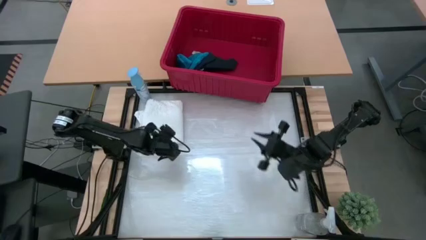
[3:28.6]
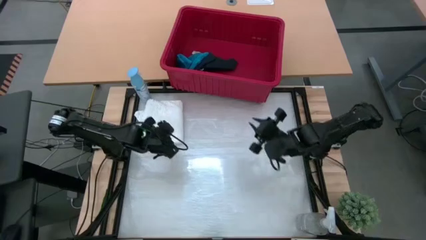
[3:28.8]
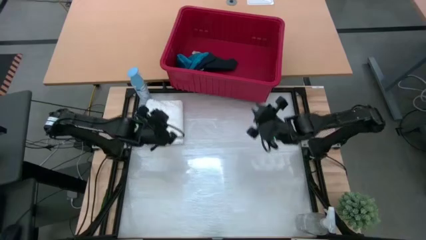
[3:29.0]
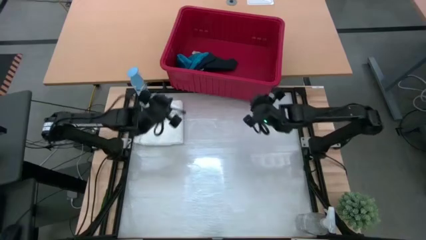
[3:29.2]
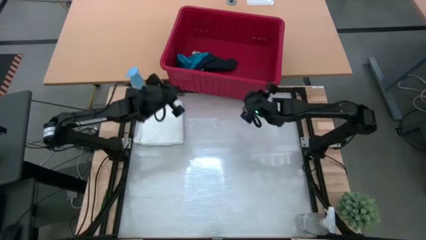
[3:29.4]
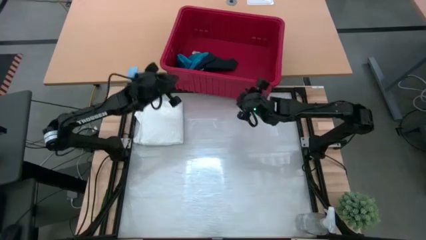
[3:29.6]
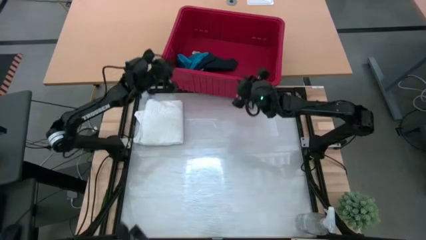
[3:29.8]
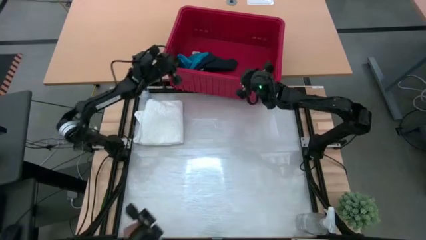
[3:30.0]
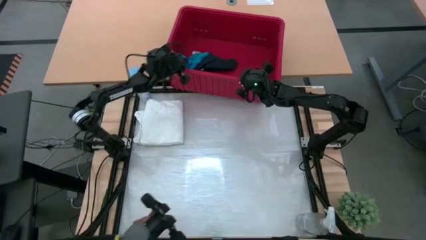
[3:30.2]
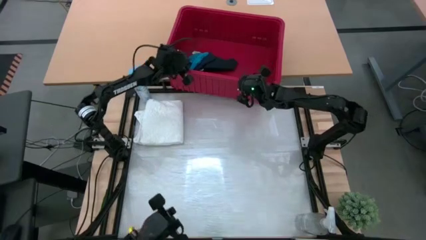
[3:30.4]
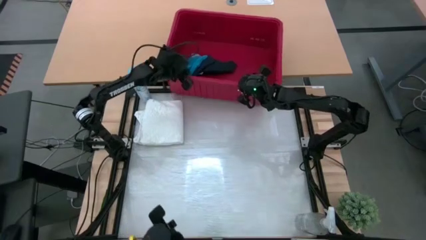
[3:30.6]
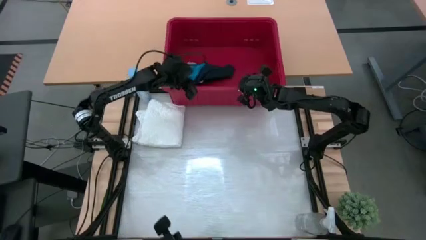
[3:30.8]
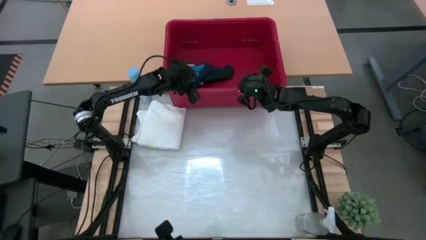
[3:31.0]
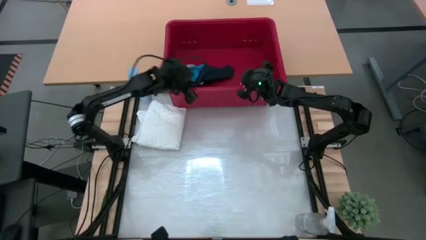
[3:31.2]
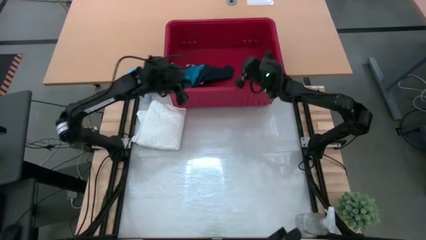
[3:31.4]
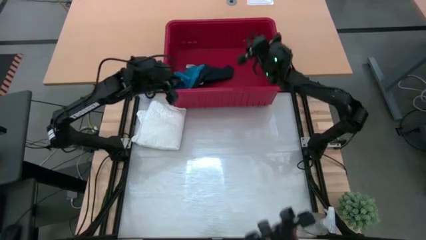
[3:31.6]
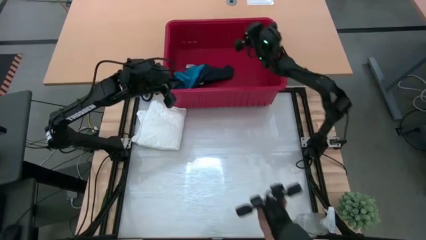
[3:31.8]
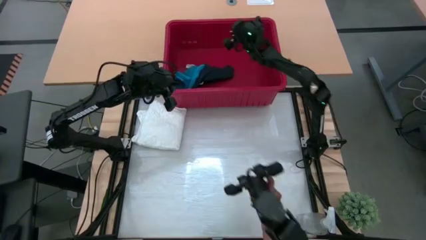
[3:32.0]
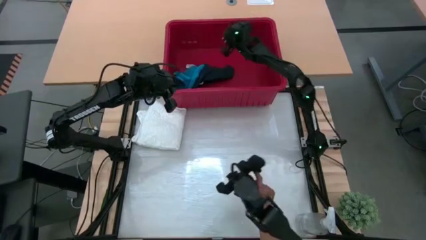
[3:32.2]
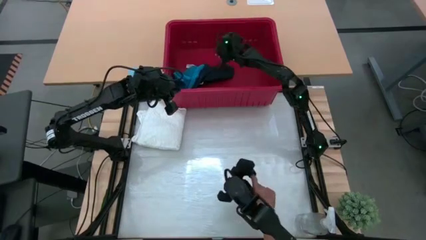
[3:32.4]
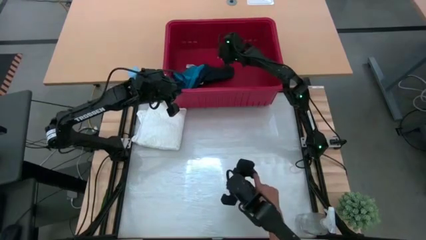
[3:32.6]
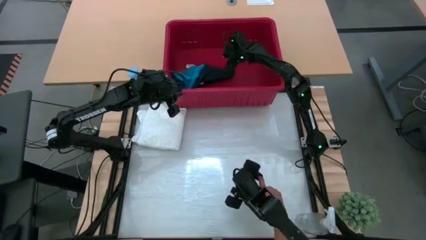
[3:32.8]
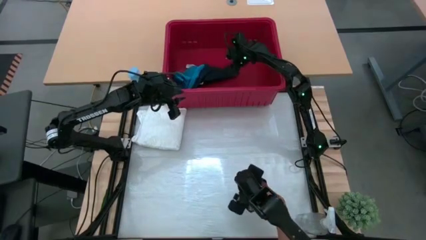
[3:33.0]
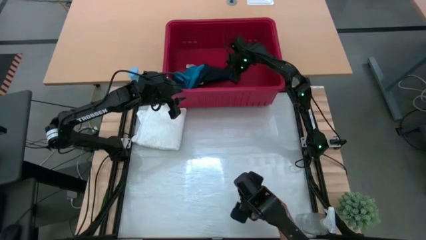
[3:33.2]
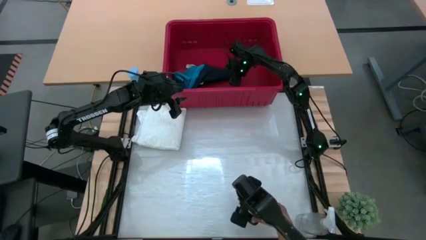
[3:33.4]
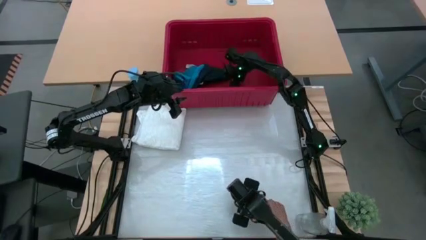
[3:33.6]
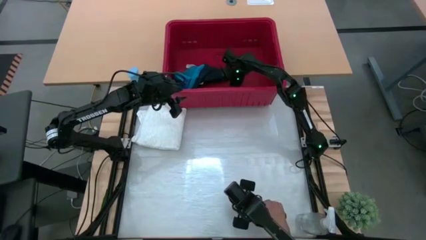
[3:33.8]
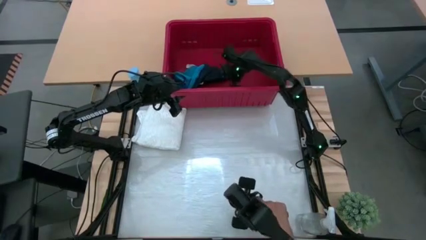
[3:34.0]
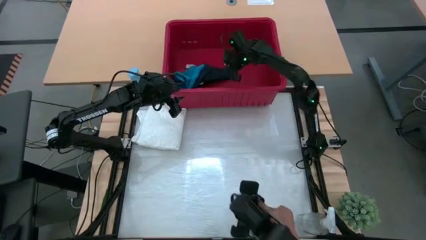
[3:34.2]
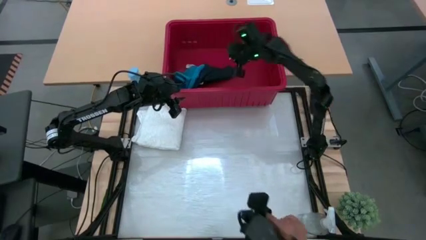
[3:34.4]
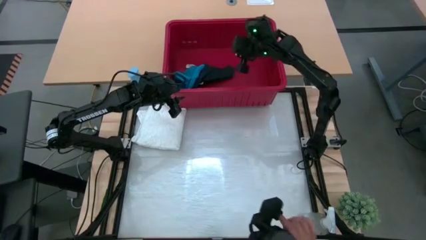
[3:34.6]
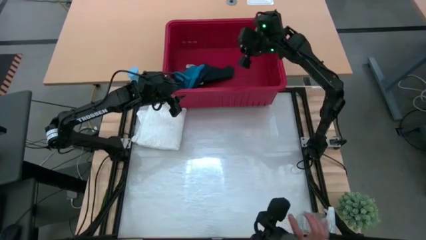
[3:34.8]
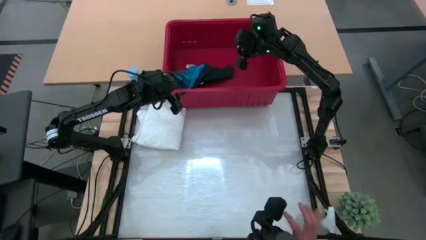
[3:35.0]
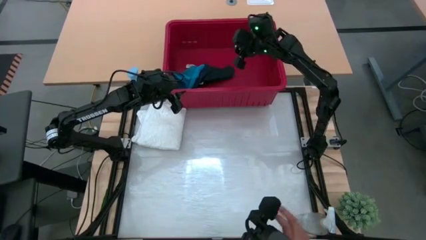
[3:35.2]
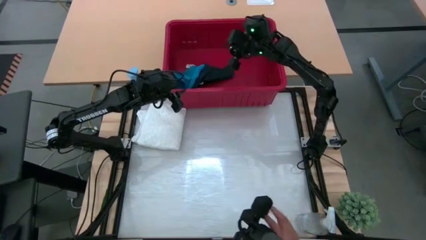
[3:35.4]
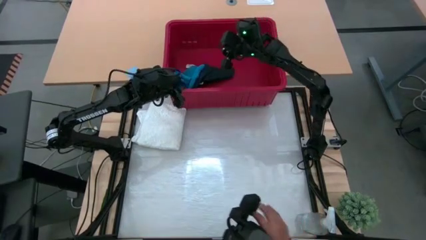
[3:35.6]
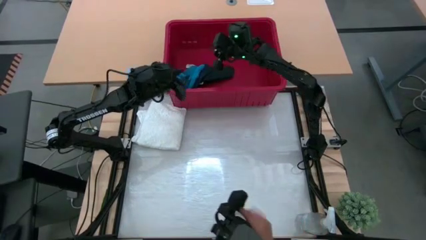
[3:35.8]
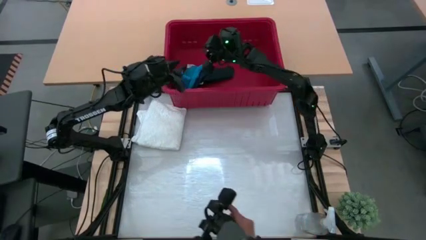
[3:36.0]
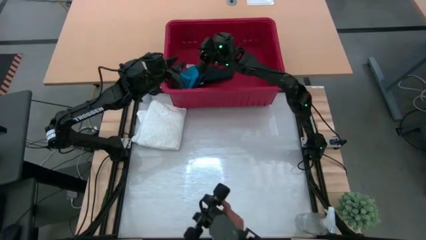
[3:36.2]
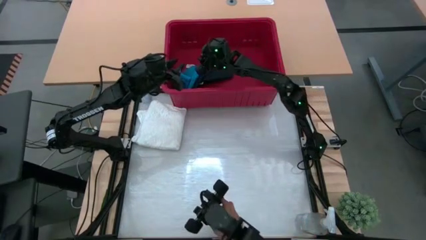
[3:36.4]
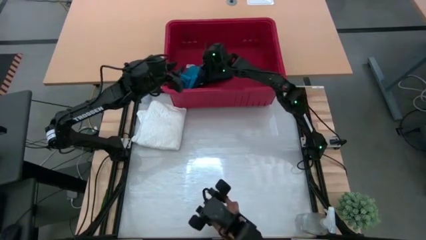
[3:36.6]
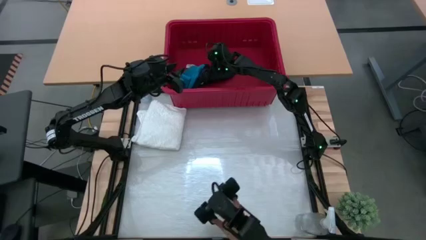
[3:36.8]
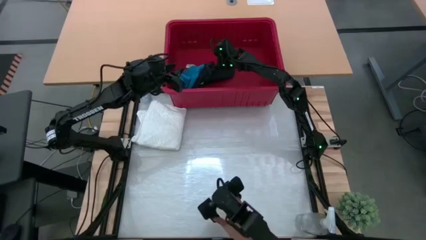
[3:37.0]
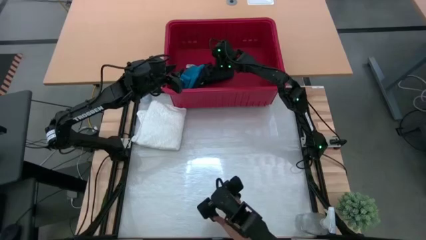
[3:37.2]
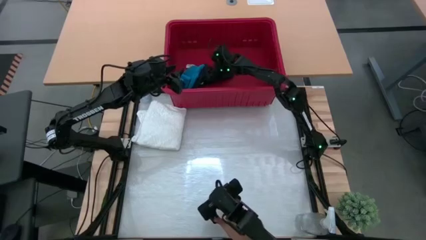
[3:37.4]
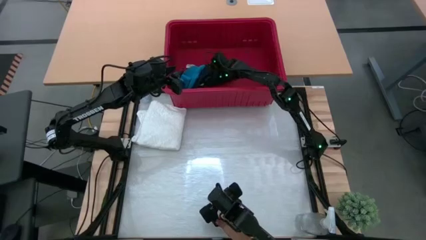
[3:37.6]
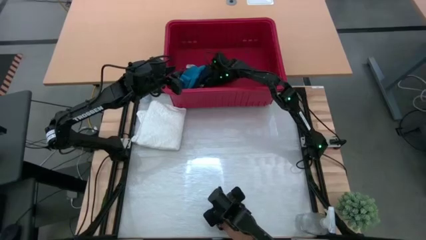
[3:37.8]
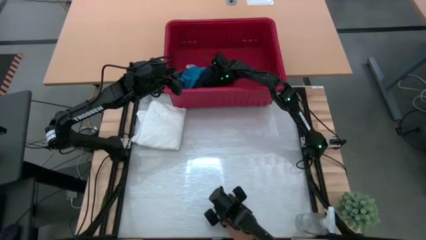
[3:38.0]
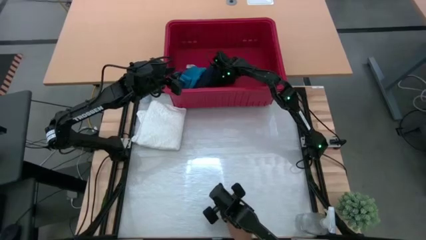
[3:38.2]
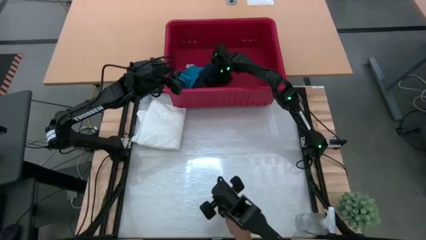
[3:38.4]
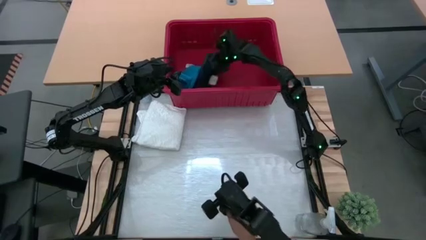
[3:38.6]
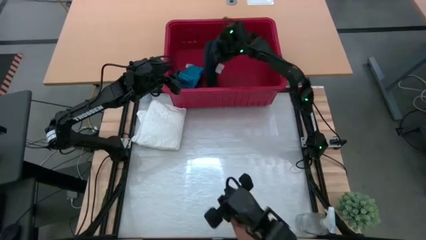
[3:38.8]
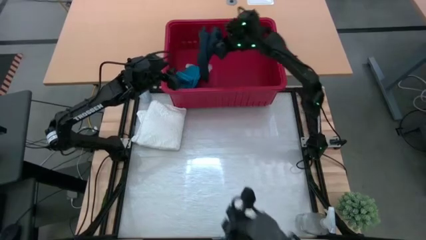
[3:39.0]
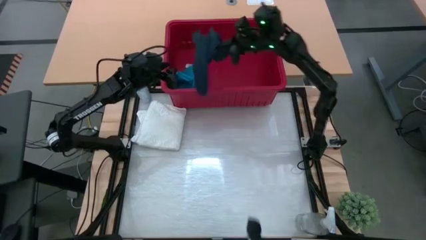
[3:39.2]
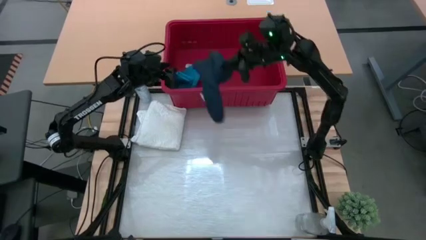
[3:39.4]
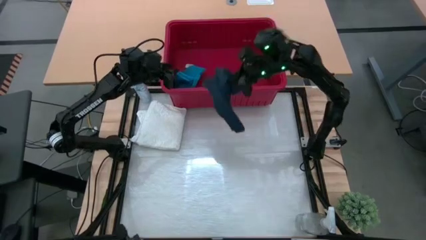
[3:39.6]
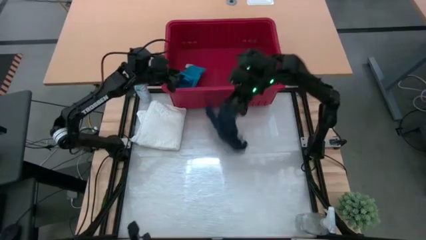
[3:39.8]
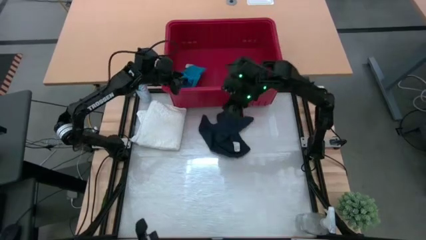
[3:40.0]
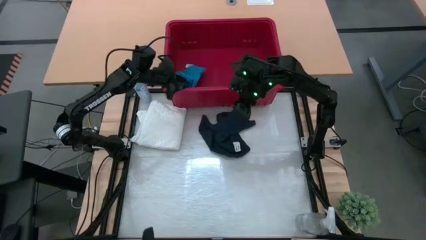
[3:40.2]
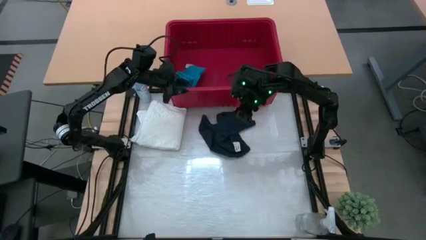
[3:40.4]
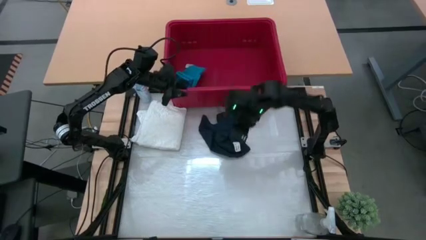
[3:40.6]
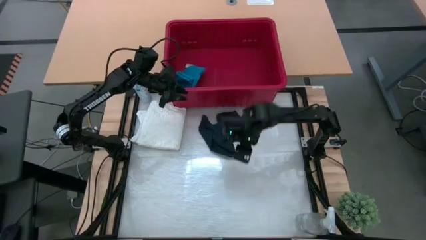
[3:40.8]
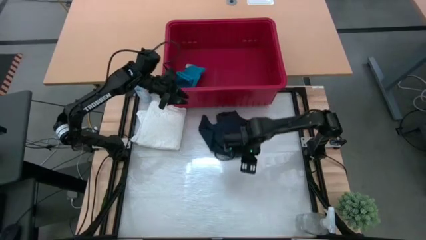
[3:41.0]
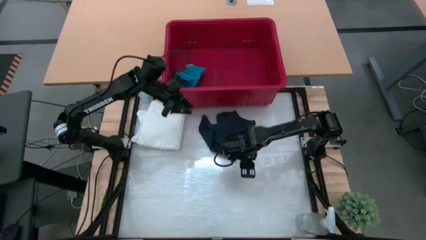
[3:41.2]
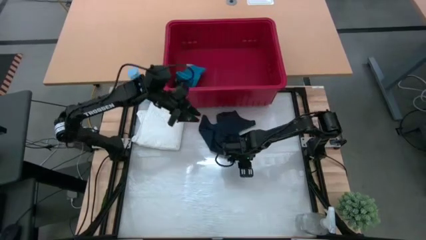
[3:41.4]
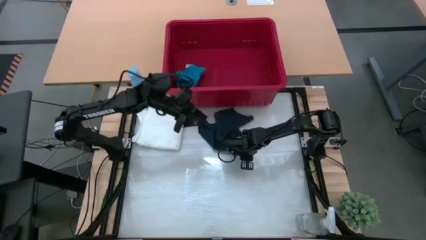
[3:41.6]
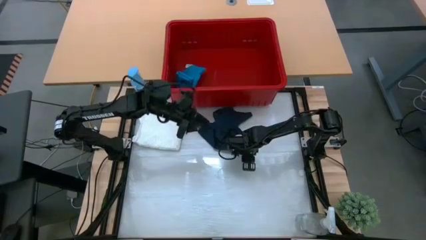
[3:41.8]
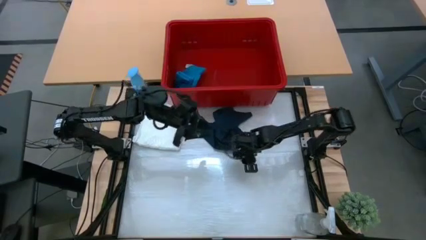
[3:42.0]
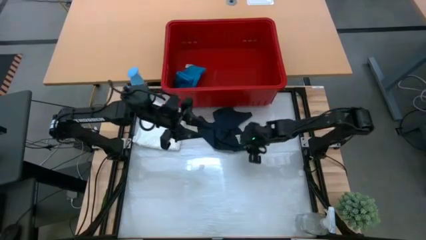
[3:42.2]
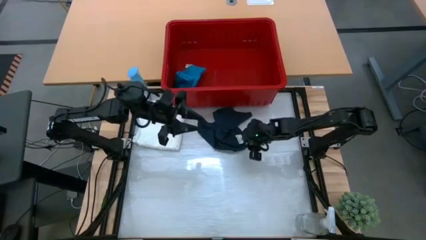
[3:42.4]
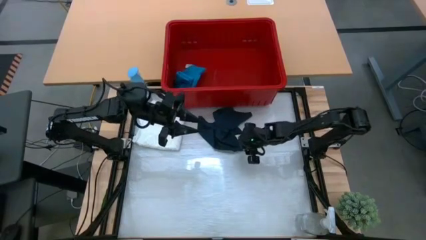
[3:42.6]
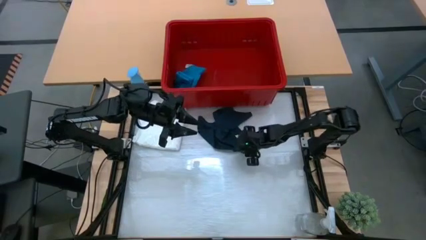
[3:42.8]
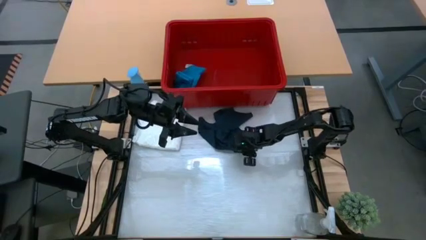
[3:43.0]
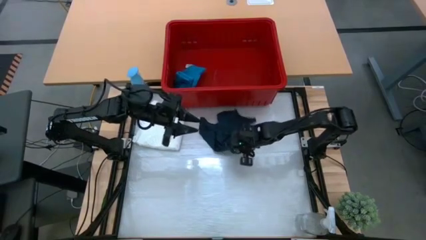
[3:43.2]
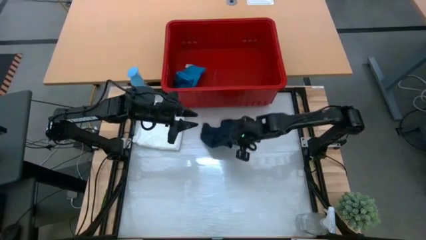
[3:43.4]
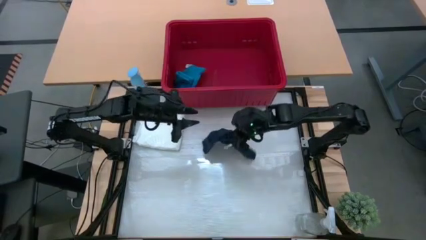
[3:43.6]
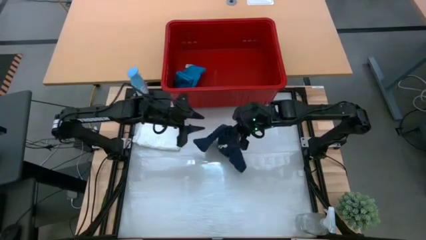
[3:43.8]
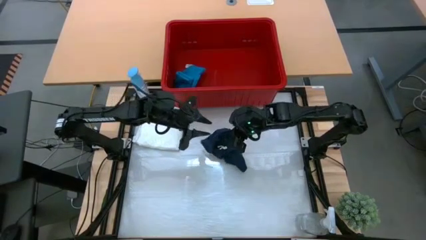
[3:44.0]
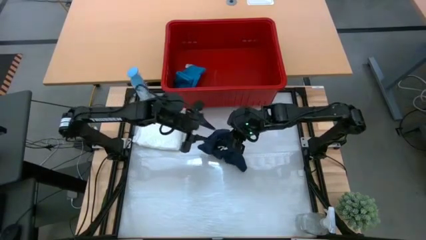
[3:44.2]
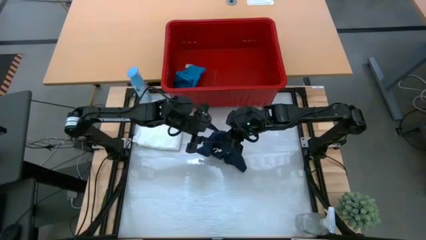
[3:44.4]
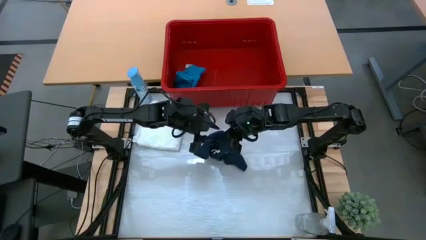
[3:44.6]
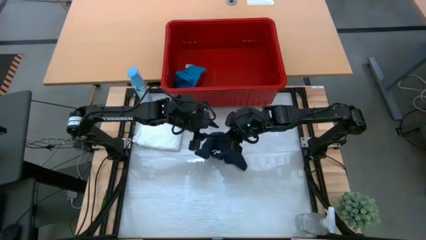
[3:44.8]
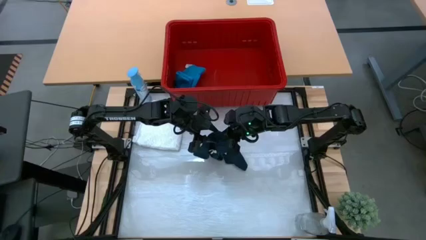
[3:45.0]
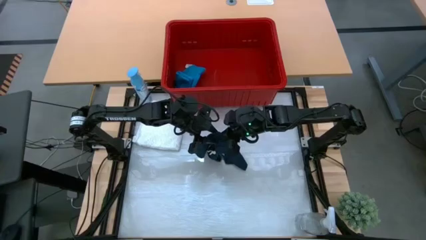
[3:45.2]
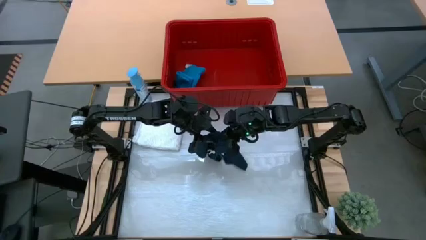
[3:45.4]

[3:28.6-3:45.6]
Task: Fold Laundry from Bin
Fold the black shorts
